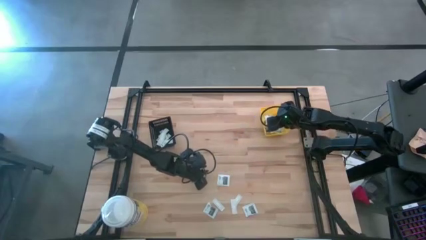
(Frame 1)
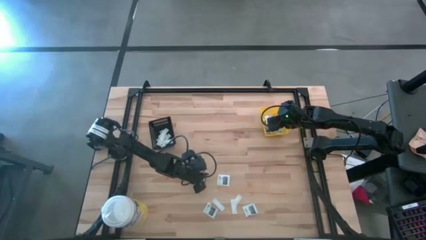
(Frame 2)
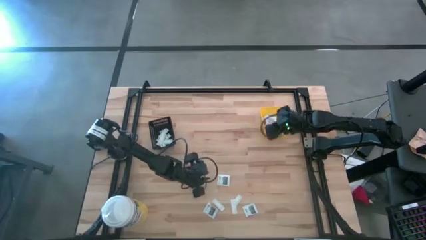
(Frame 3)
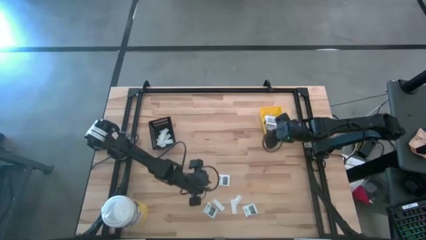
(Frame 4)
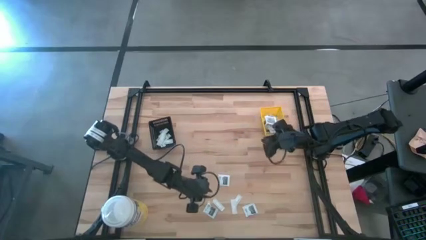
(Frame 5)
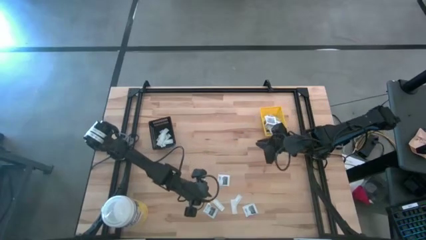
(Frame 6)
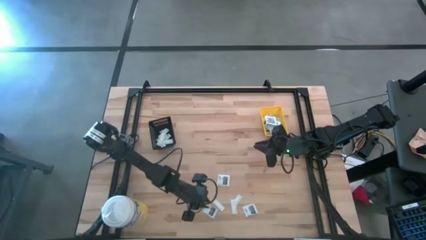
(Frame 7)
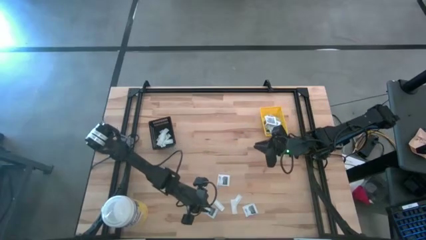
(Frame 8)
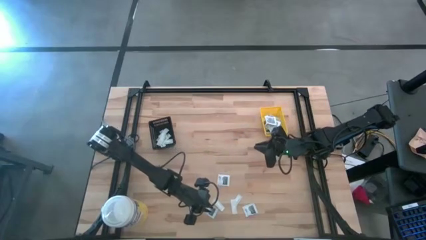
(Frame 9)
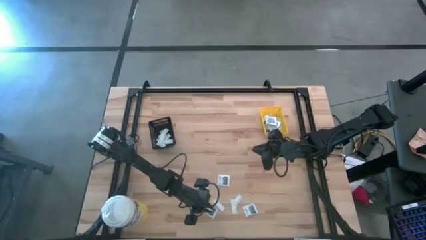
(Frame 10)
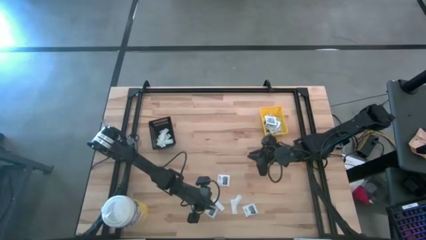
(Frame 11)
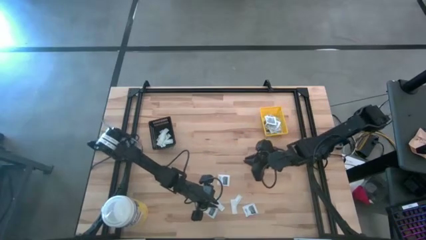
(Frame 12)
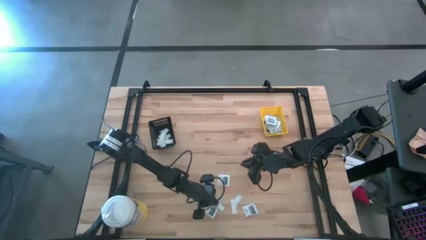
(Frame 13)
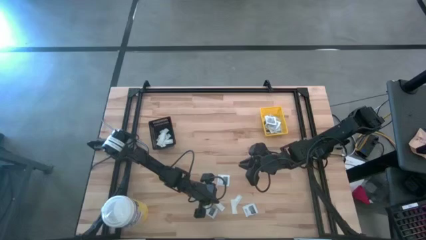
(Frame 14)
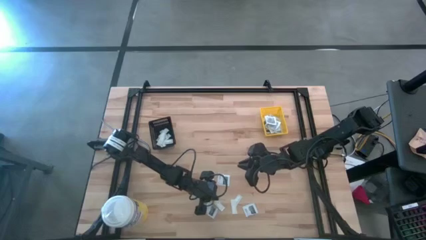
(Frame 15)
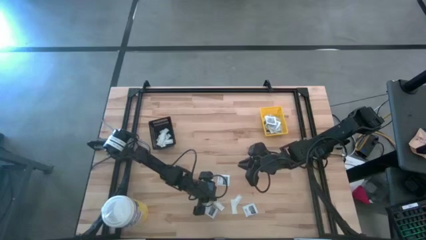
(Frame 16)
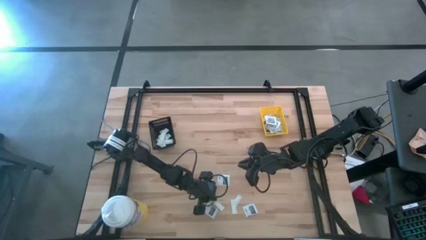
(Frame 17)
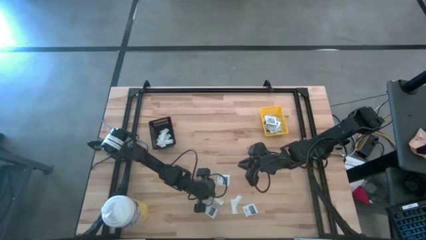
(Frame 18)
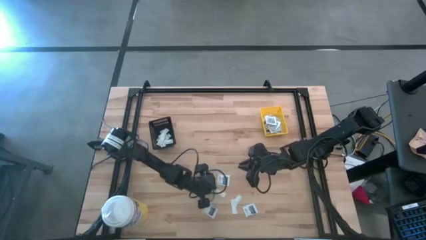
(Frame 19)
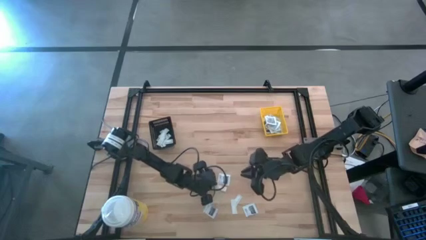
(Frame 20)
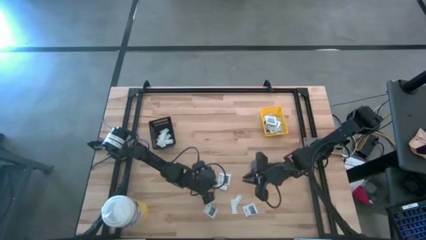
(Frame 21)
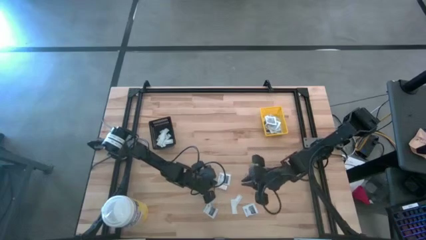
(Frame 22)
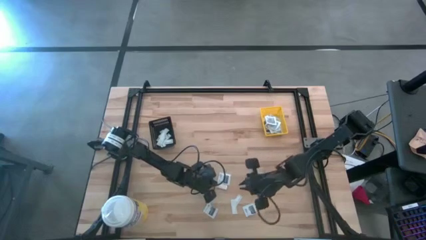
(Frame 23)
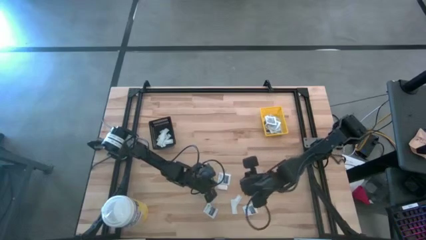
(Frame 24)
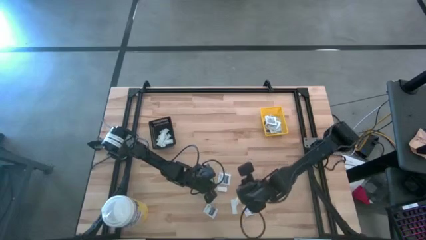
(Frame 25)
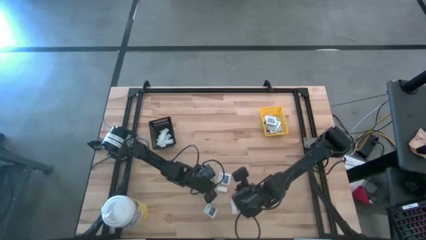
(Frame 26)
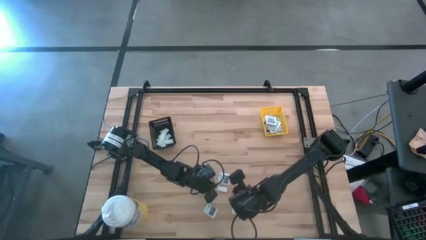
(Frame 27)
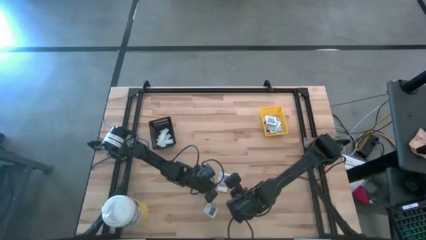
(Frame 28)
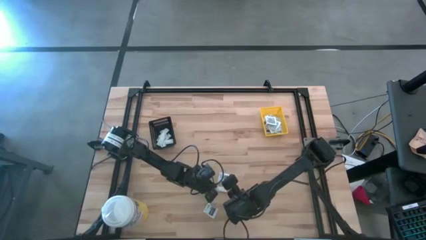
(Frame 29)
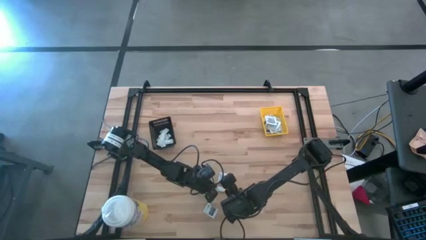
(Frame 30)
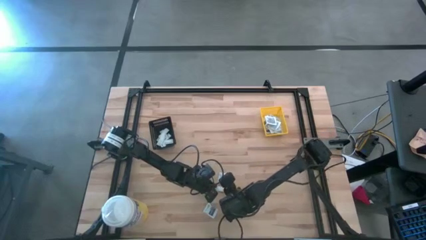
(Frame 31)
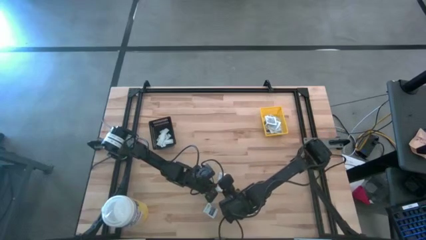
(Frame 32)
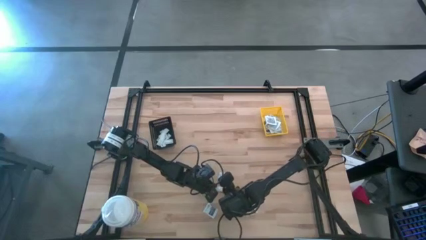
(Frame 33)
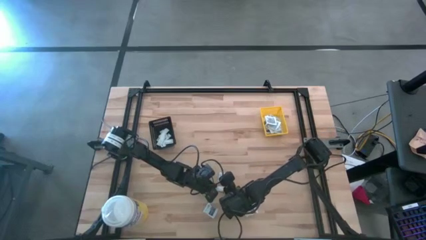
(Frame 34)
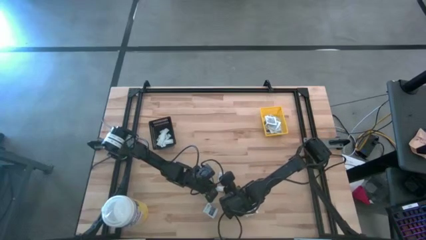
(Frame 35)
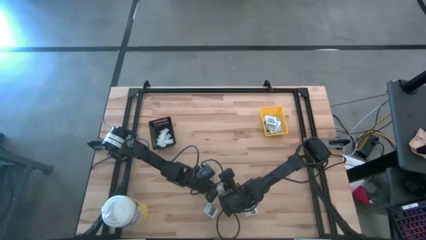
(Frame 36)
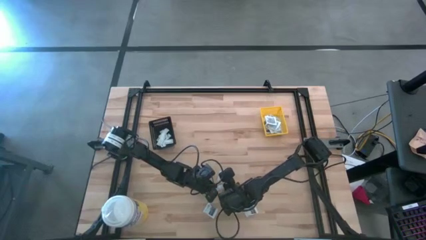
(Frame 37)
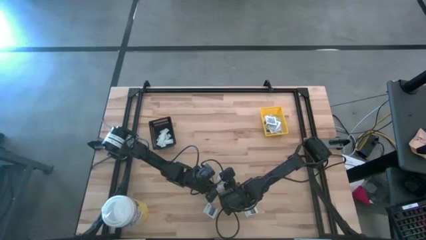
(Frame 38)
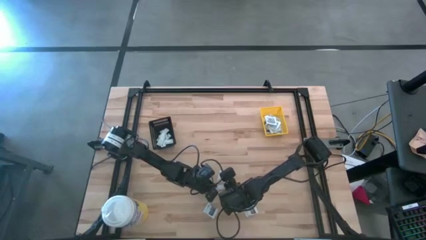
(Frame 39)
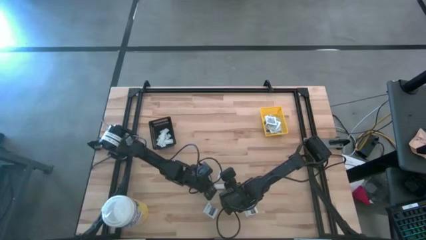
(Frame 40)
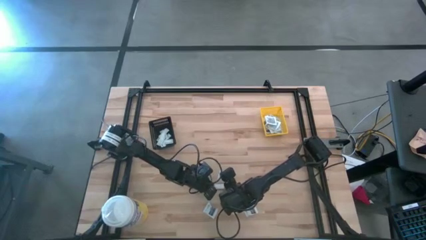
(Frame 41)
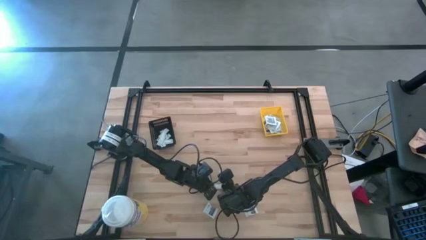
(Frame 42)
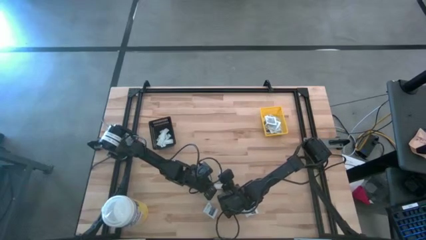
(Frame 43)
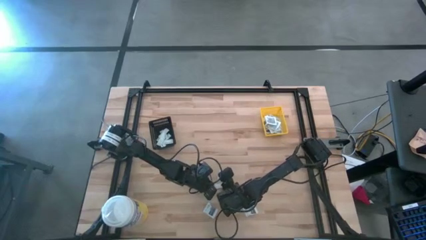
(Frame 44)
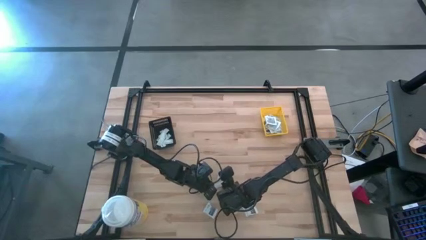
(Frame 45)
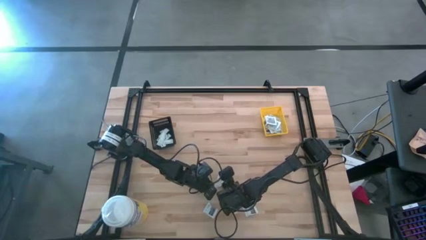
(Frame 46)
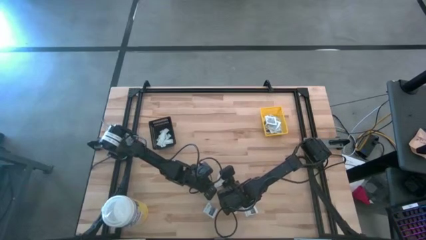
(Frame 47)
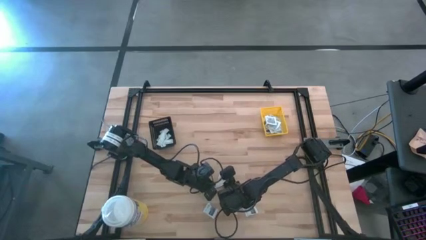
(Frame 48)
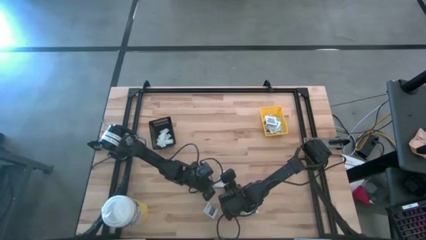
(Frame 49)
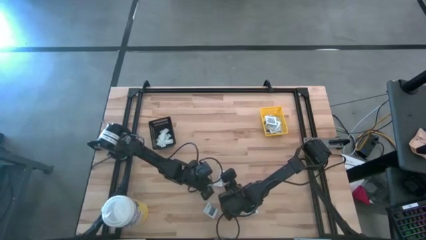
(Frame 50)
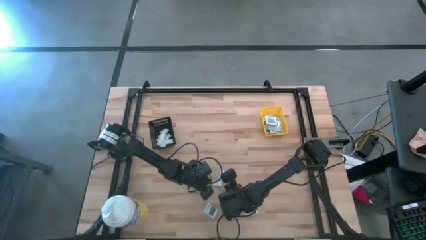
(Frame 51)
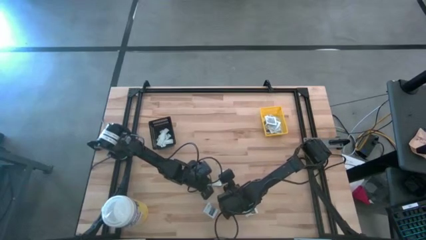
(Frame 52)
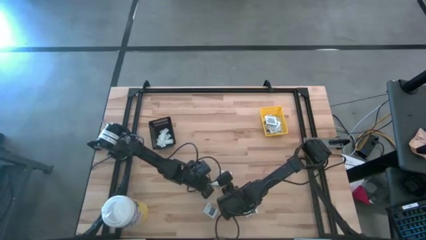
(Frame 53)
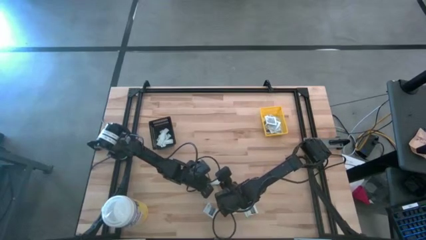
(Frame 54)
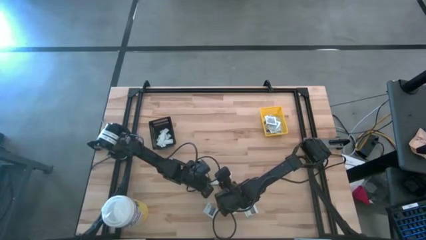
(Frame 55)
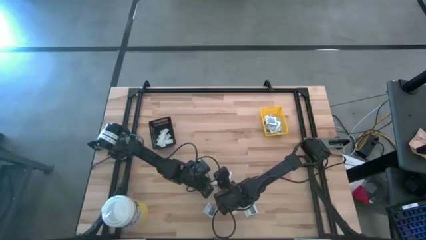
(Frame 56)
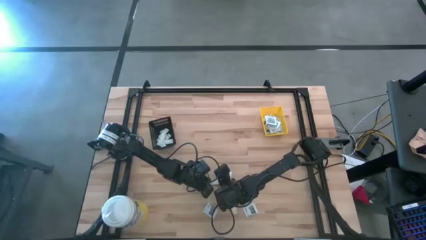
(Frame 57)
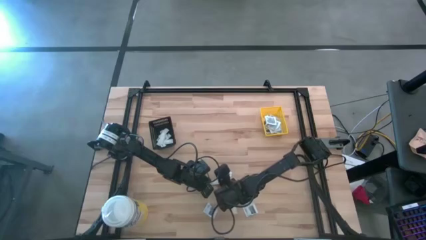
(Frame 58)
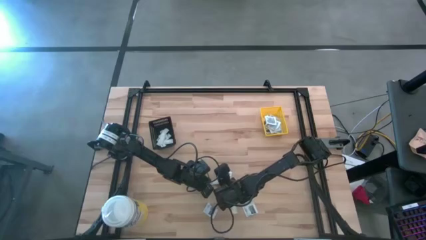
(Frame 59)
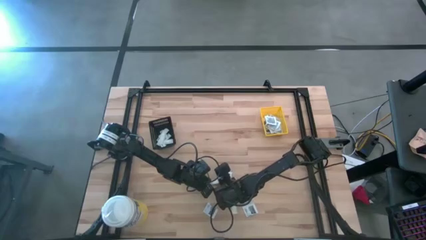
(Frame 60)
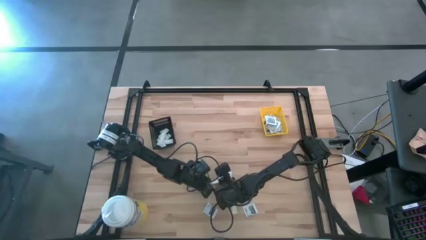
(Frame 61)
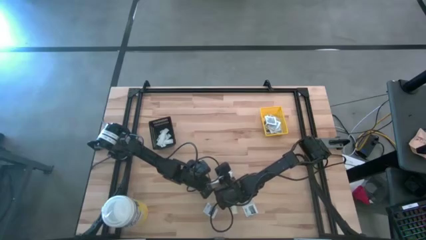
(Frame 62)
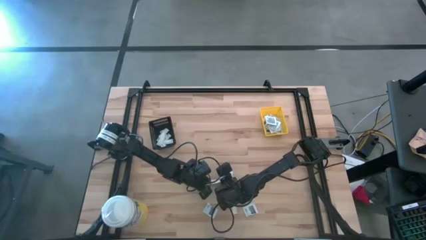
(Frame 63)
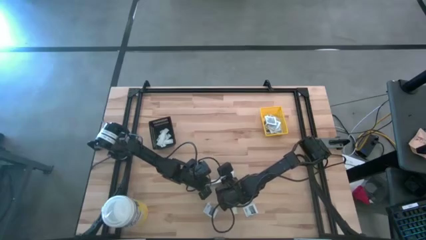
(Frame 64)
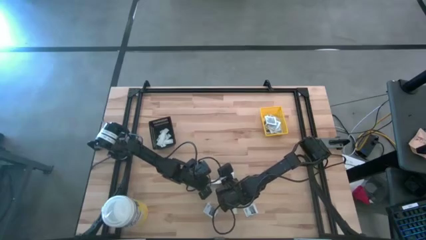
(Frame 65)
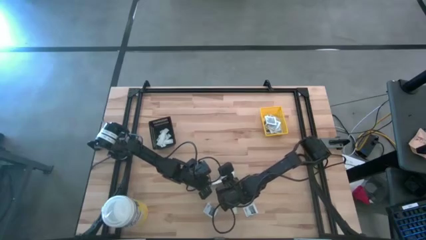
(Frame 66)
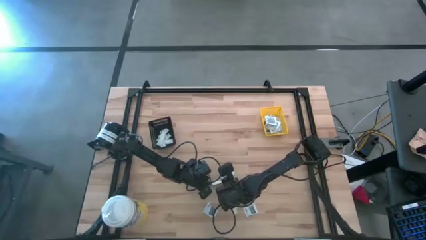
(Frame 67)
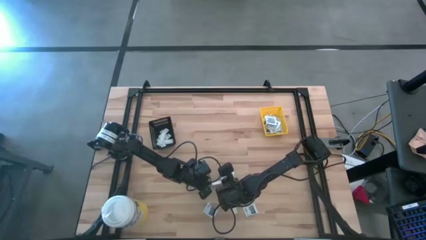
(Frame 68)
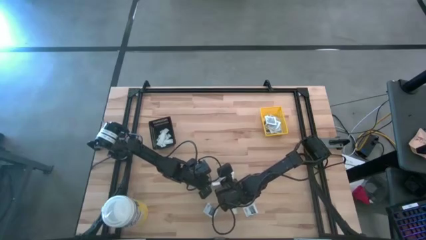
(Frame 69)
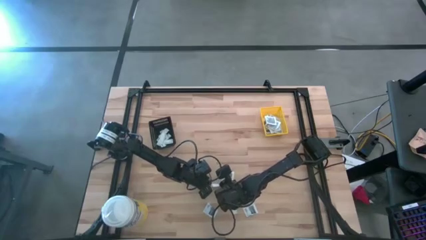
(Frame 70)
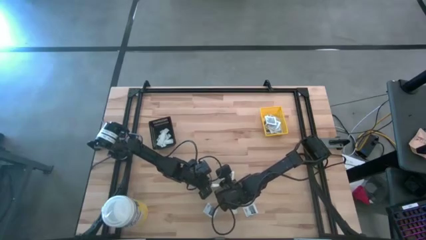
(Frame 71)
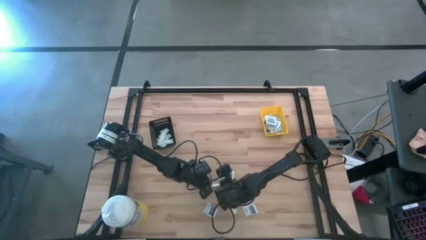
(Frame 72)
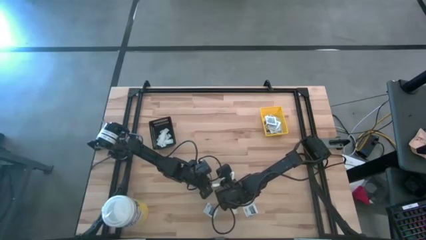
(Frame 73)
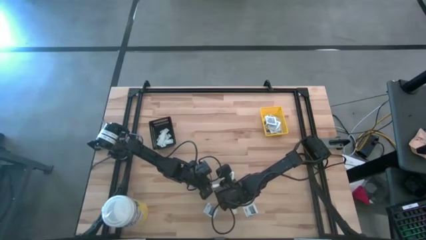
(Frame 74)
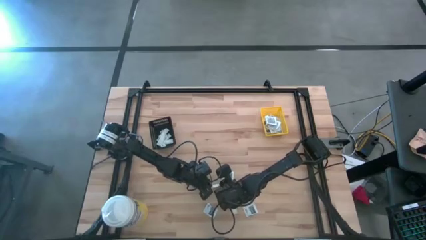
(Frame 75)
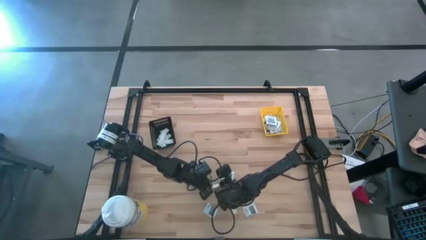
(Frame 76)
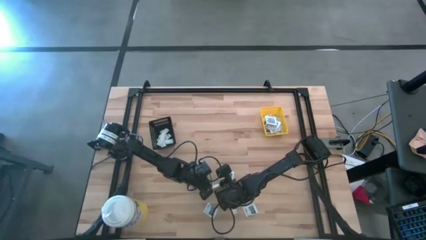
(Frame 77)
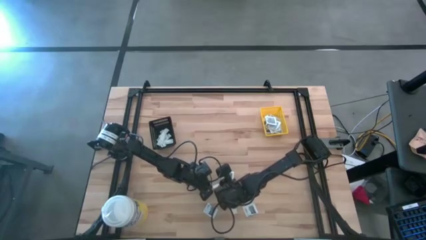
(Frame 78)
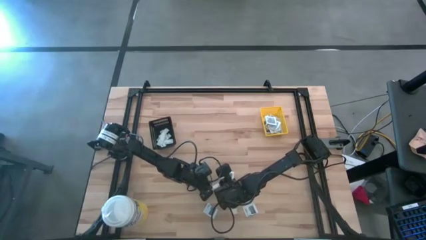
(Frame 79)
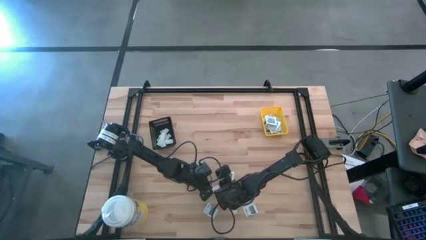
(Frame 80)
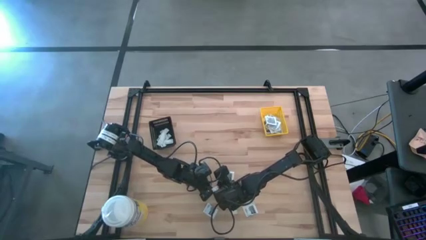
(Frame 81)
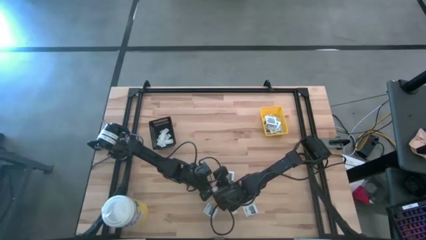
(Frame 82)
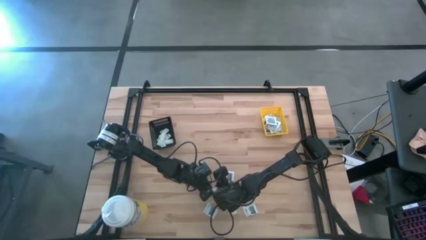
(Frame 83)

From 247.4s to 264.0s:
Task: Pick & Place First Aid Supplies
Put the green bandage into the black bin
